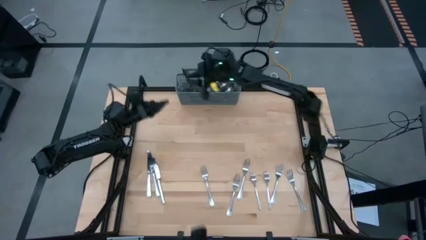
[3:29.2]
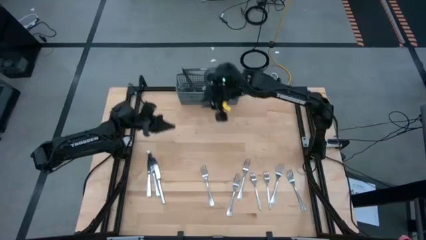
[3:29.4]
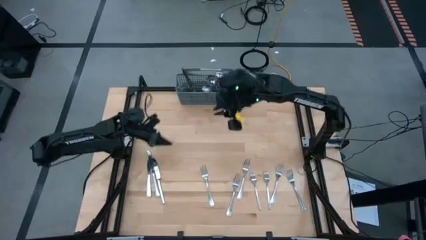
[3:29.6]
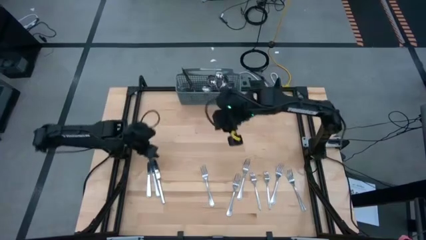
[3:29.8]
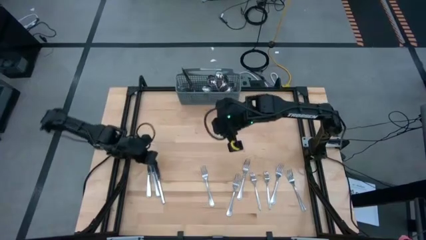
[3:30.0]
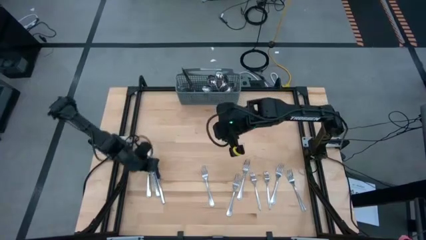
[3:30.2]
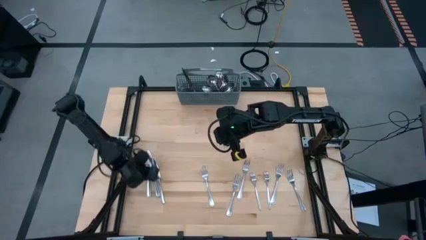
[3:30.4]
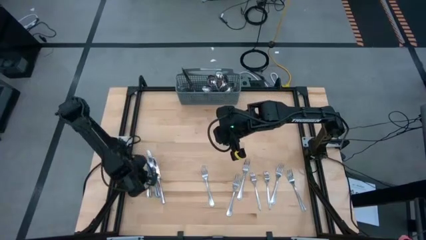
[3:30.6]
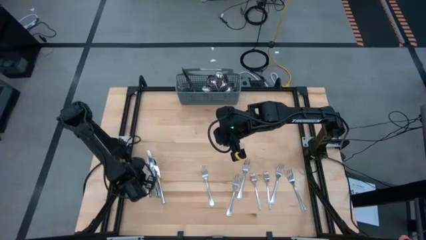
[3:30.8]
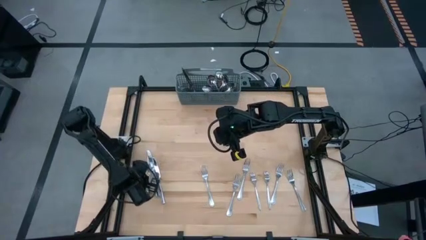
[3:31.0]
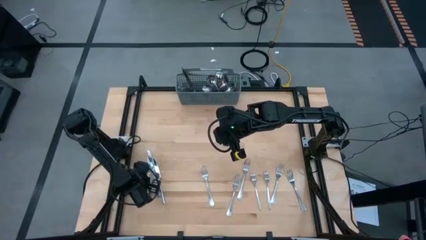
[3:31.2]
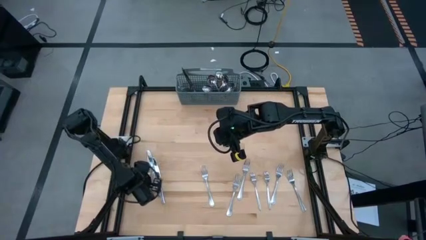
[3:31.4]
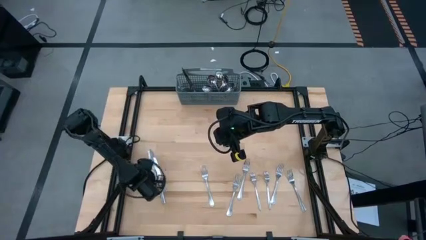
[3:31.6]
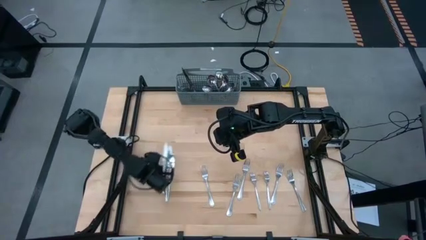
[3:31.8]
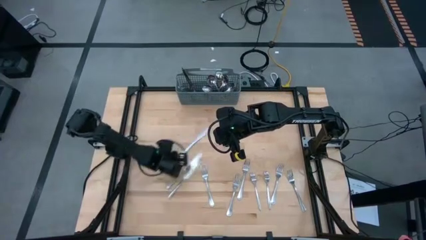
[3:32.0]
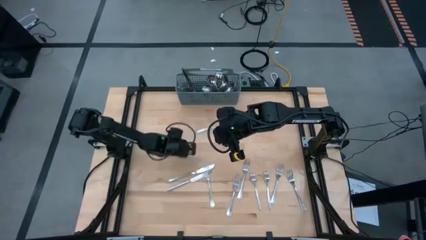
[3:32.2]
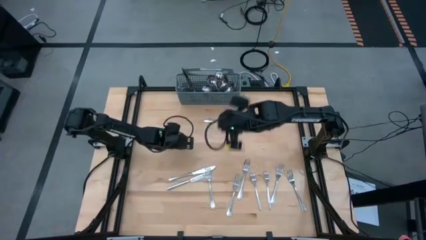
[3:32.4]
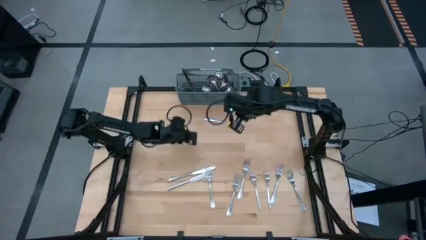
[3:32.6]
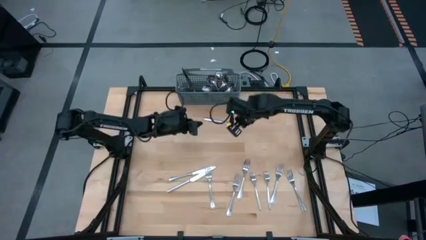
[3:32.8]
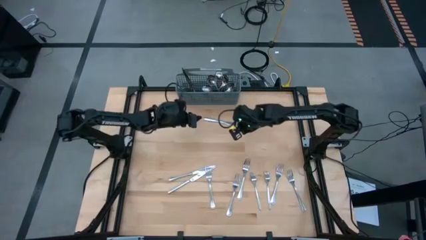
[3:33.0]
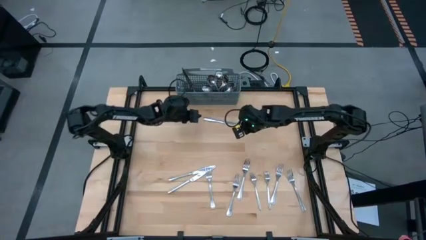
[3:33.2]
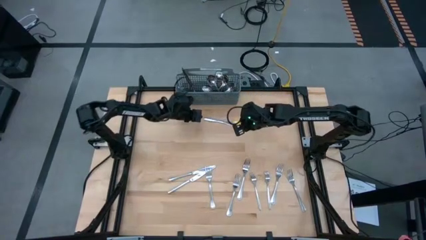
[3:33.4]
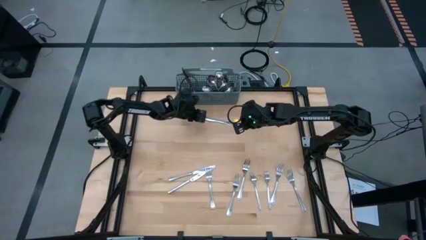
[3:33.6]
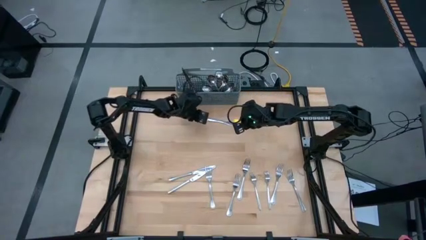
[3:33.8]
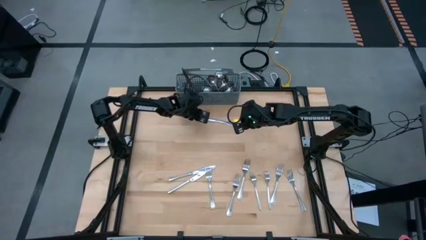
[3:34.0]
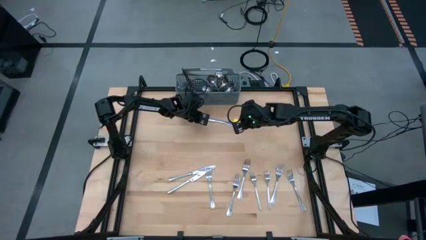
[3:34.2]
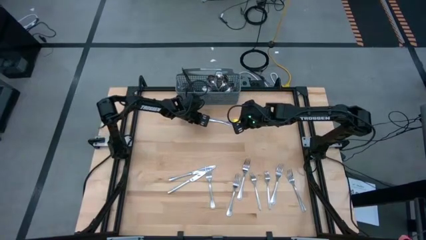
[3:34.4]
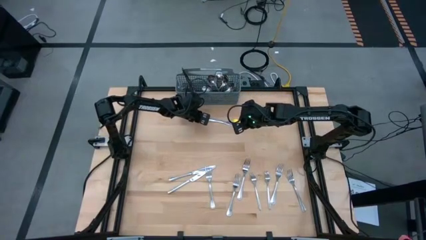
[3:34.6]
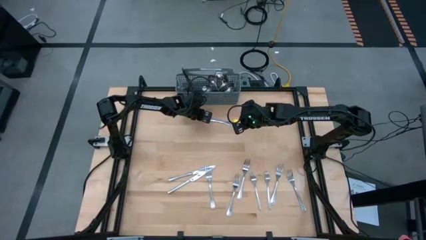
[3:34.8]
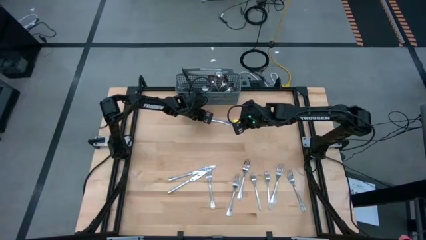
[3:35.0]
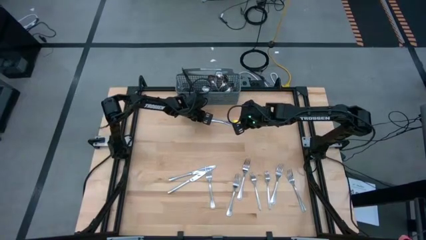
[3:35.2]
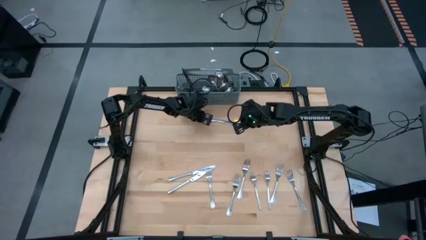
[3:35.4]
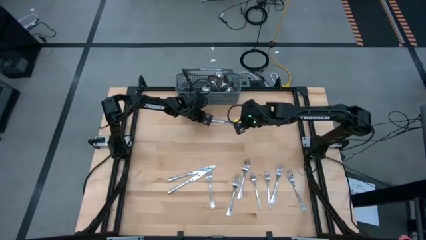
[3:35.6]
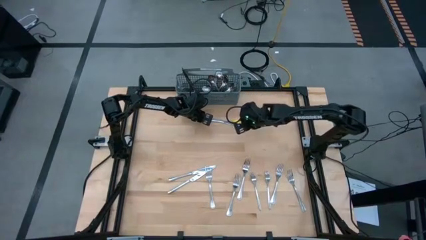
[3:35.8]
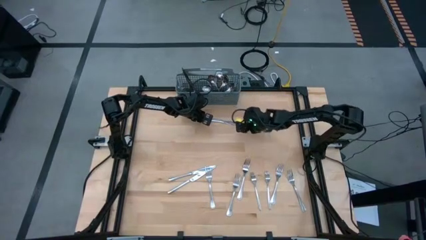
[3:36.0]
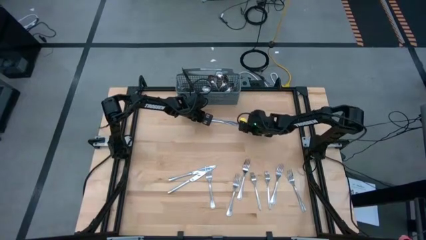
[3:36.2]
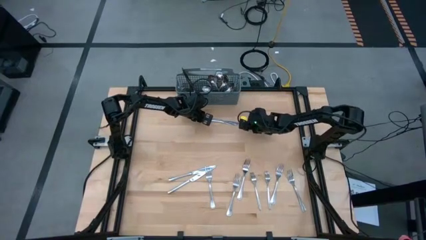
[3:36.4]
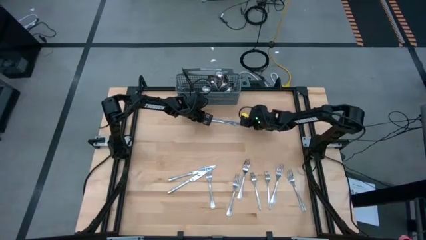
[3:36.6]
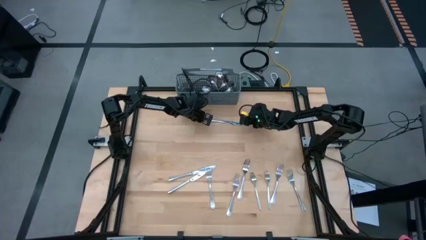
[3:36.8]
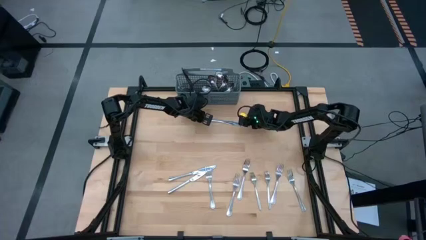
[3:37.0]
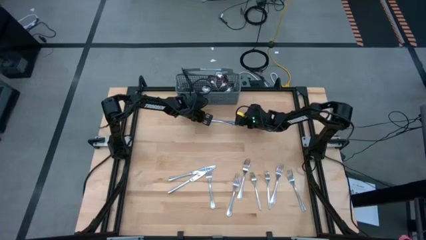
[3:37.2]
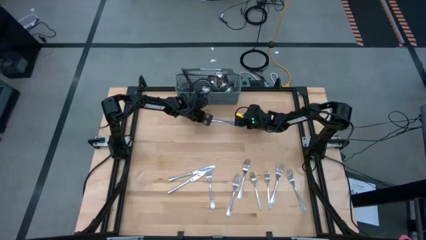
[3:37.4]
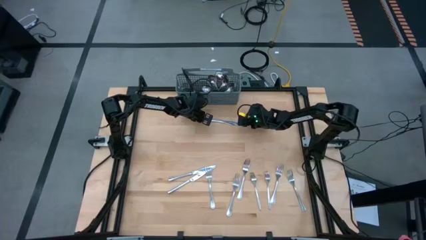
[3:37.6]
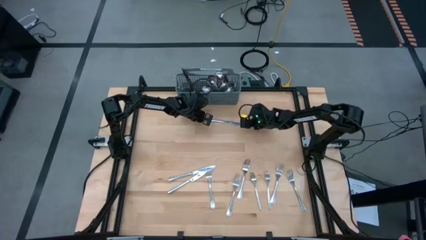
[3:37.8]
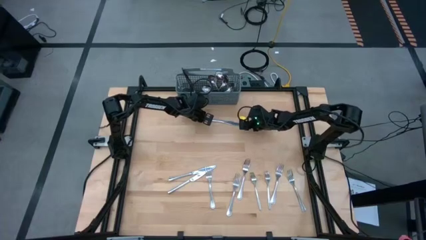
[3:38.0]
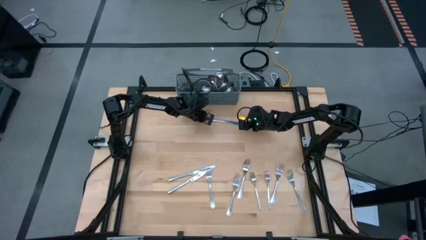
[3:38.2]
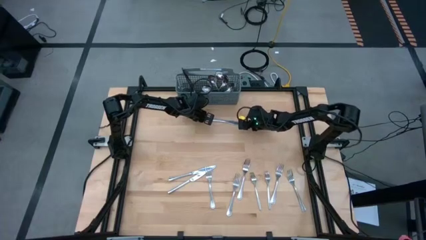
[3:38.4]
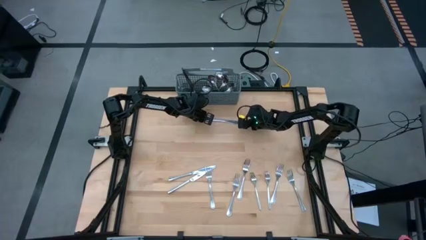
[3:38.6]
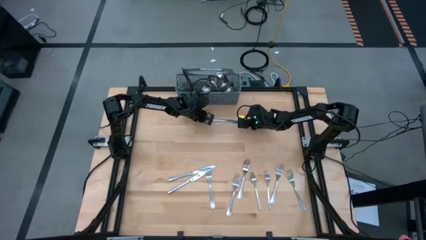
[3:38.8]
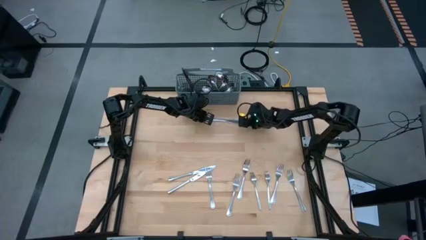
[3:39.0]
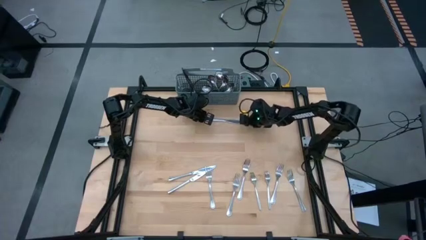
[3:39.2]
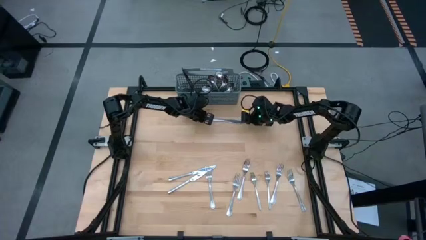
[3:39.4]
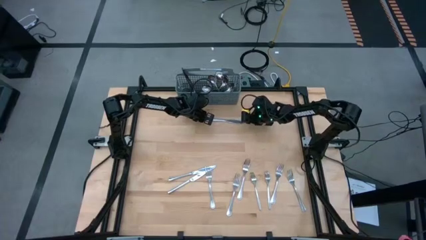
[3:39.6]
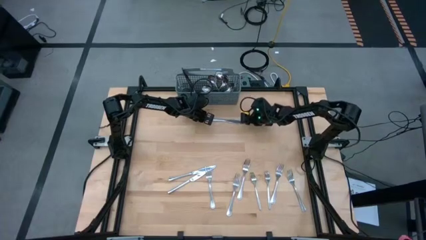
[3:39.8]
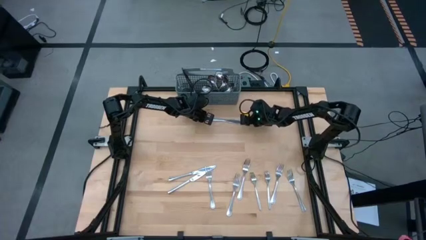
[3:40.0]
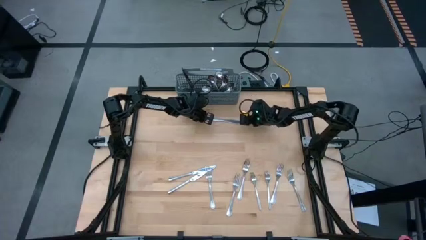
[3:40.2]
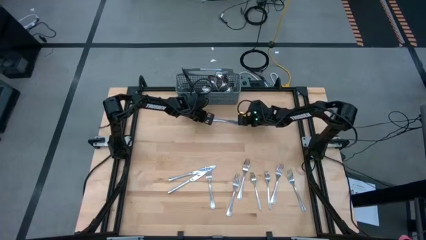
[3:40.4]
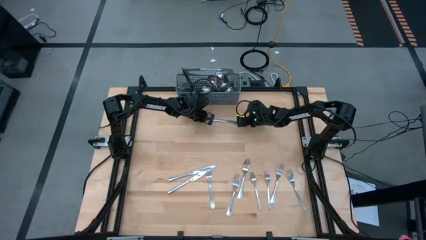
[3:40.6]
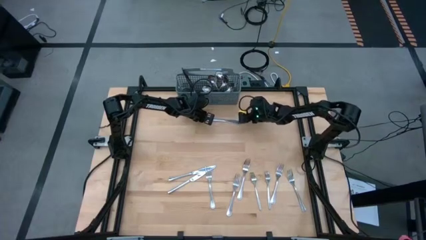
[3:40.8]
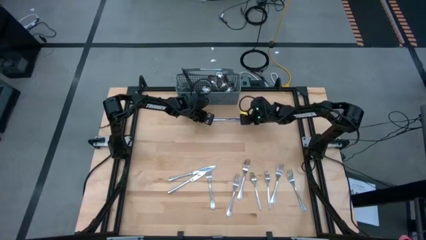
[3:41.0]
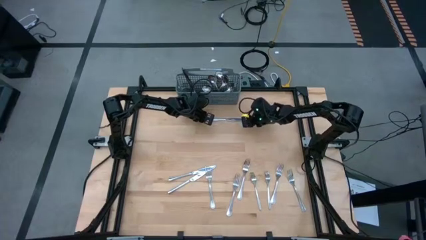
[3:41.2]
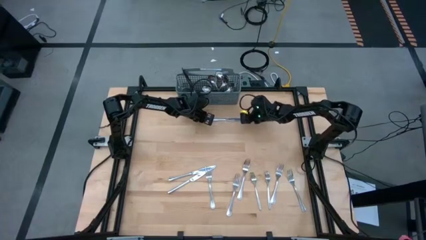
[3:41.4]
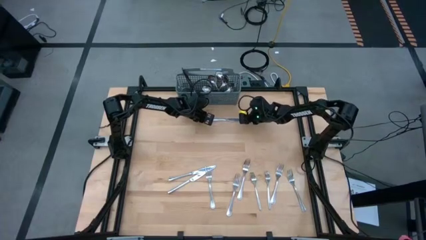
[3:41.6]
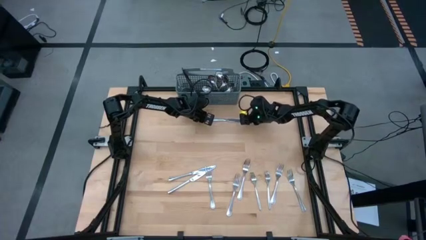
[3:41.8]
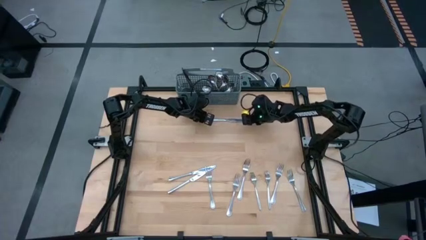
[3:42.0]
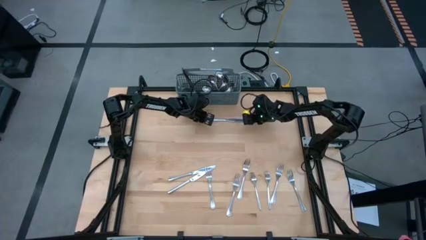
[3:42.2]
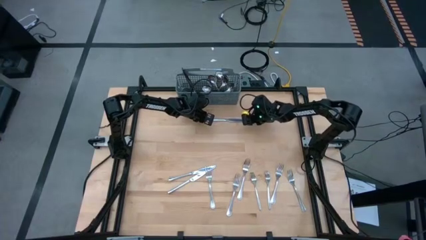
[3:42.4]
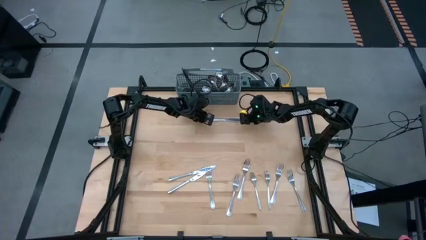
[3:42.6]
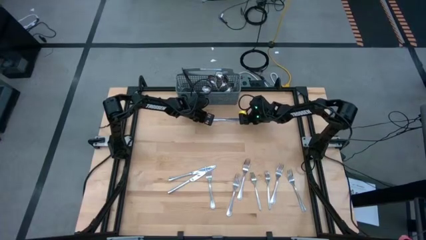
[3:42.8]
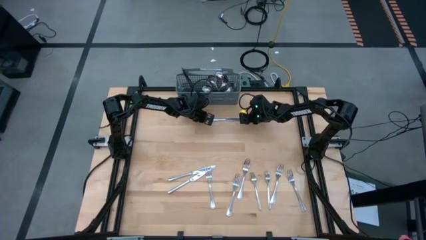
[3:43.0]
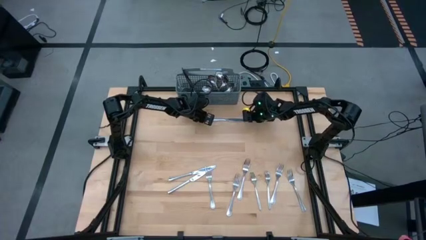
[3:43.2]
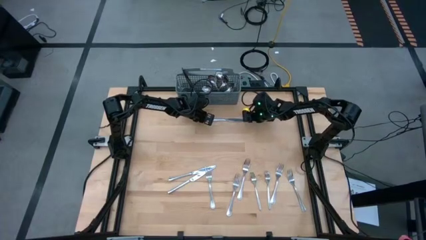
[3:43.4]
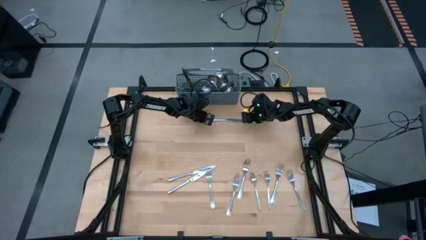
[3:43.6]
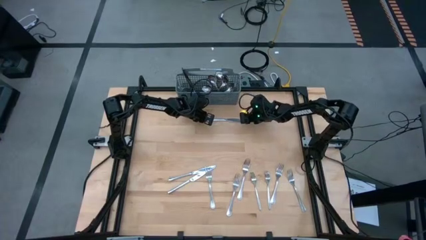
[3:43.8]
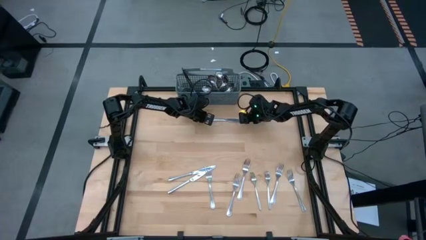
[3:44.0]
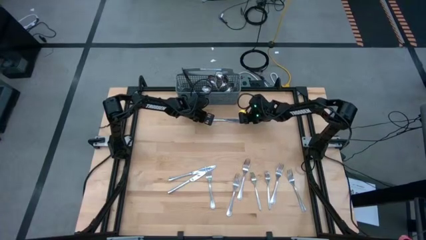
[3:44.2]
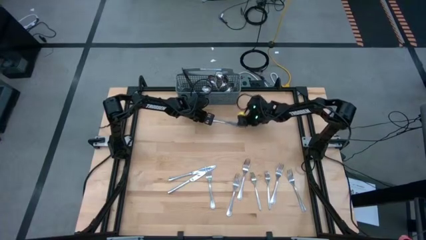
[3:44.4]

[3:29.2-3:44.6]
Task: Sort silverware
Put the silver knife into the gray utensil holder
